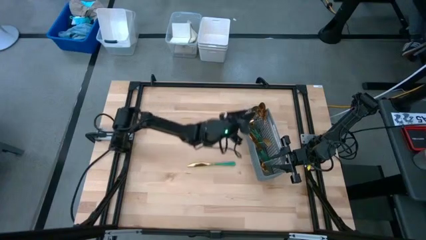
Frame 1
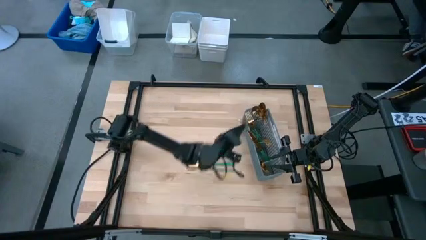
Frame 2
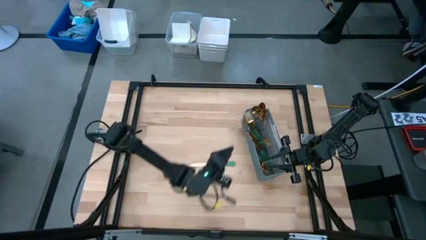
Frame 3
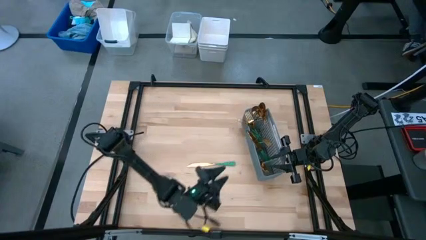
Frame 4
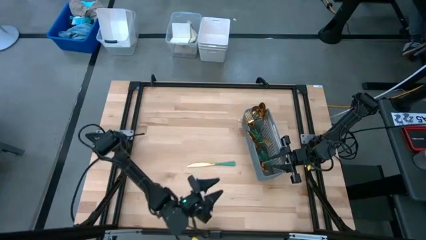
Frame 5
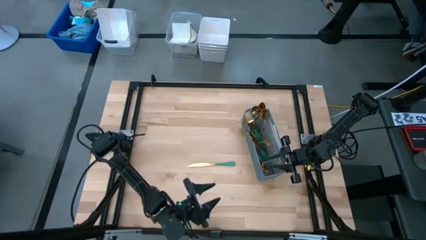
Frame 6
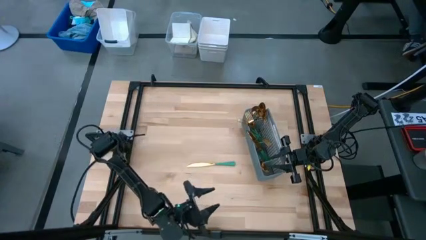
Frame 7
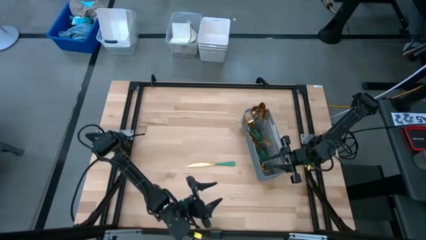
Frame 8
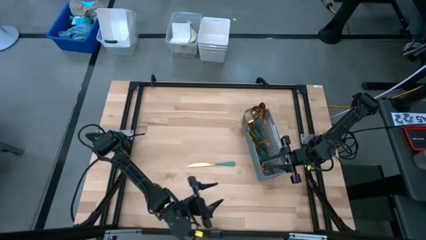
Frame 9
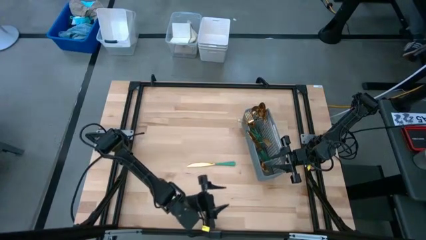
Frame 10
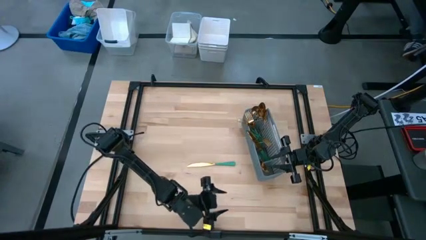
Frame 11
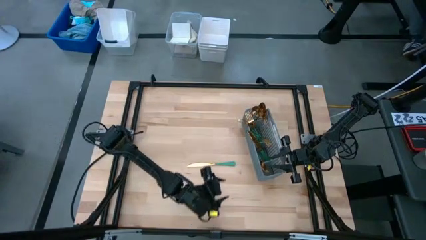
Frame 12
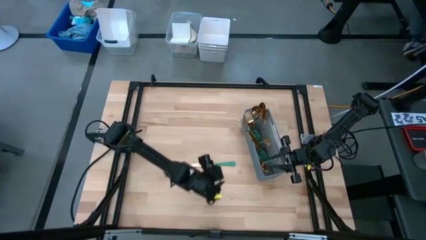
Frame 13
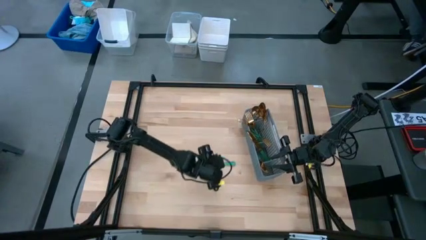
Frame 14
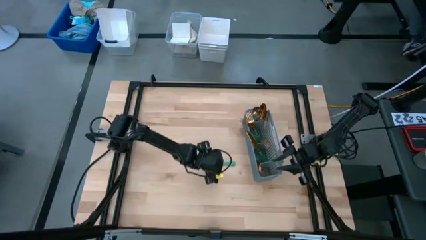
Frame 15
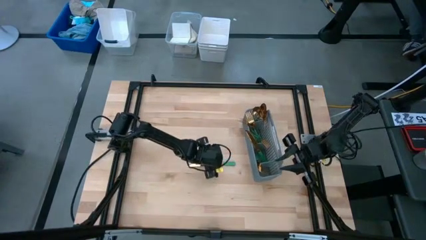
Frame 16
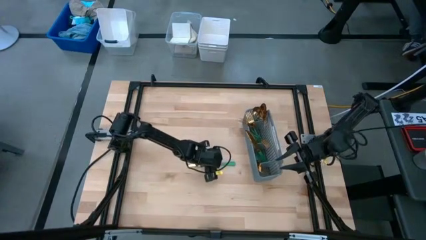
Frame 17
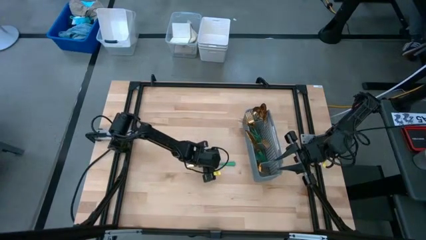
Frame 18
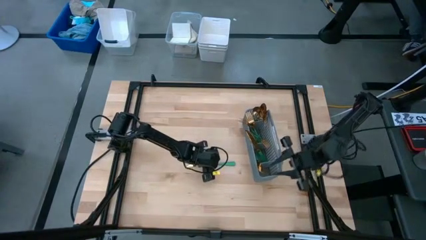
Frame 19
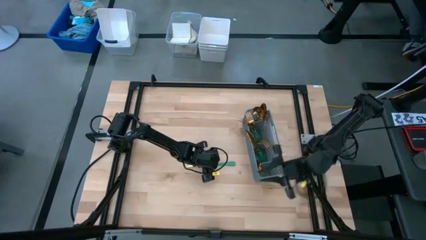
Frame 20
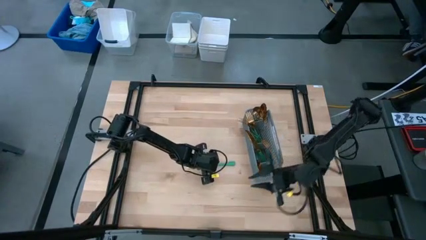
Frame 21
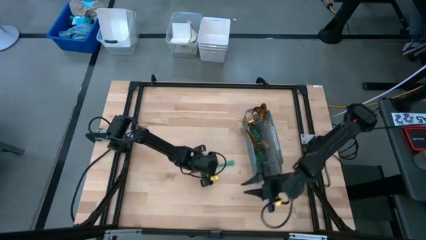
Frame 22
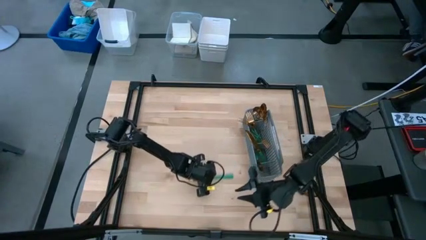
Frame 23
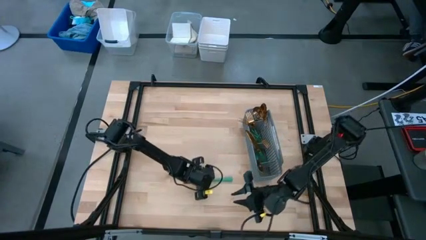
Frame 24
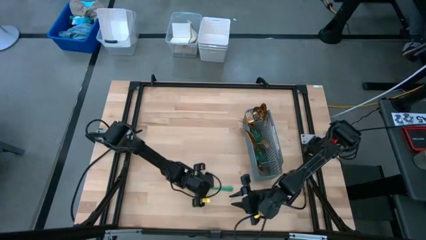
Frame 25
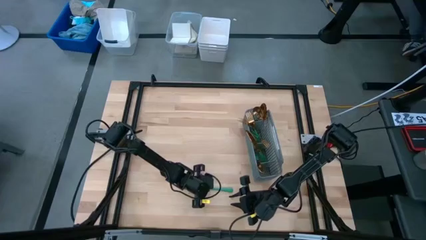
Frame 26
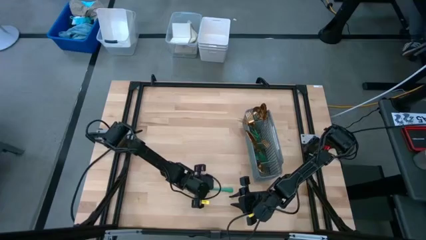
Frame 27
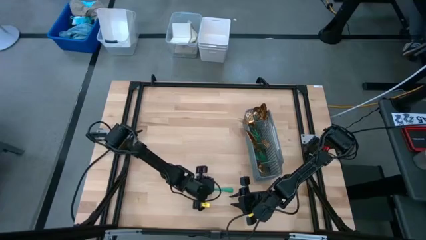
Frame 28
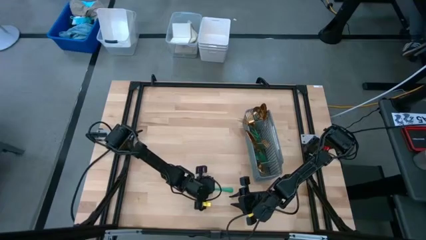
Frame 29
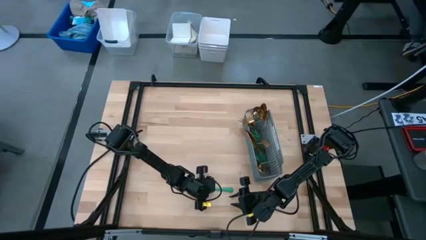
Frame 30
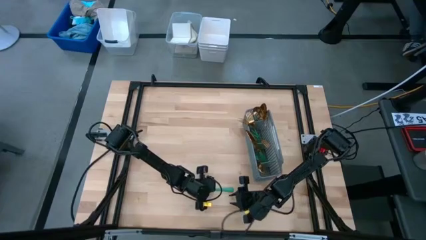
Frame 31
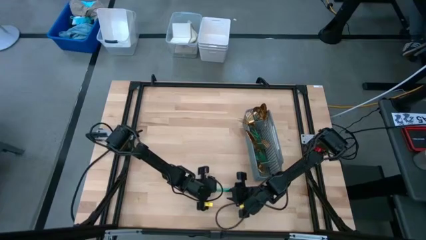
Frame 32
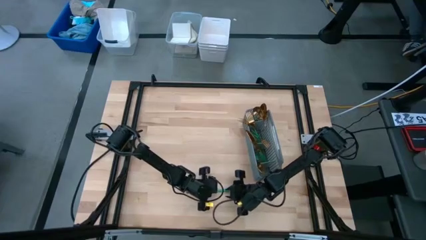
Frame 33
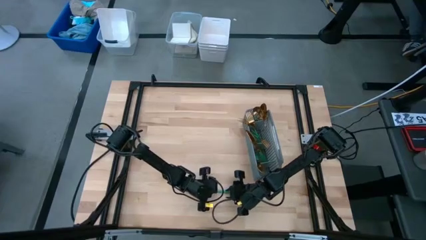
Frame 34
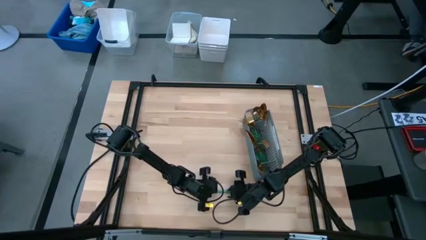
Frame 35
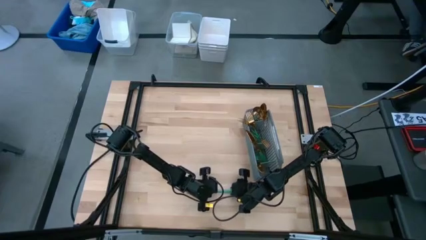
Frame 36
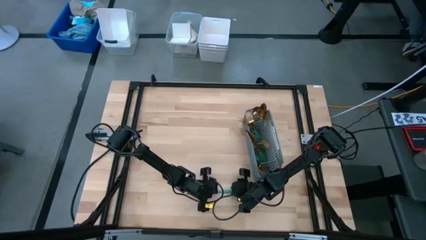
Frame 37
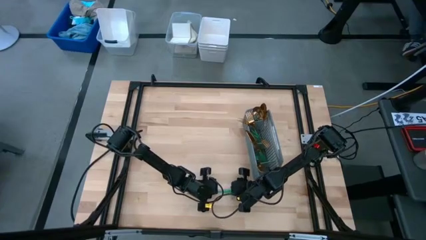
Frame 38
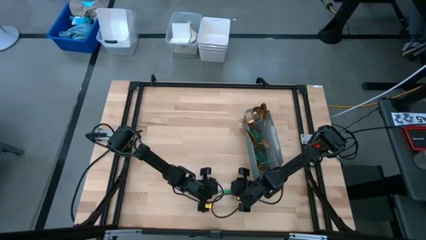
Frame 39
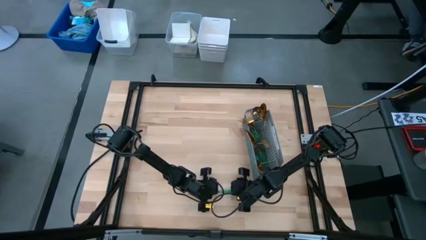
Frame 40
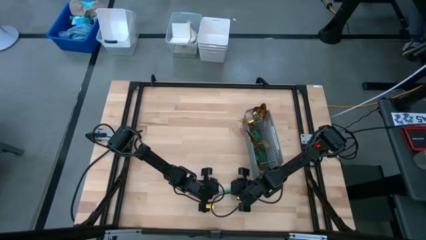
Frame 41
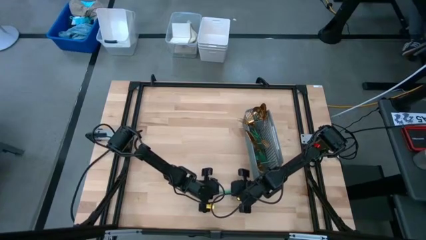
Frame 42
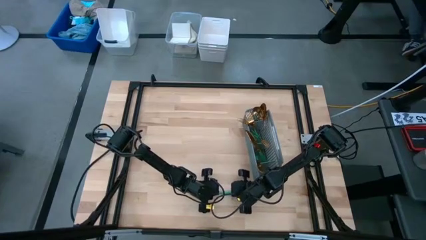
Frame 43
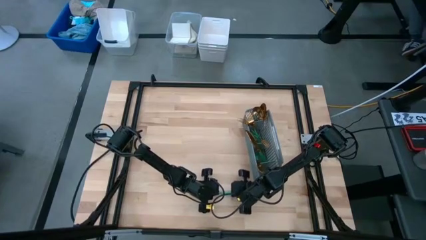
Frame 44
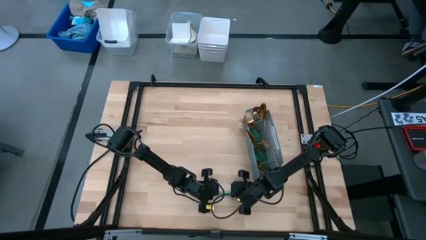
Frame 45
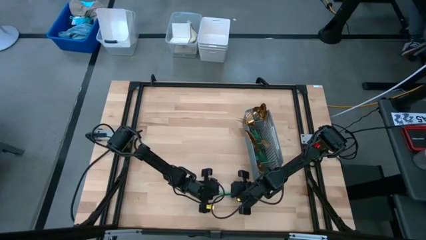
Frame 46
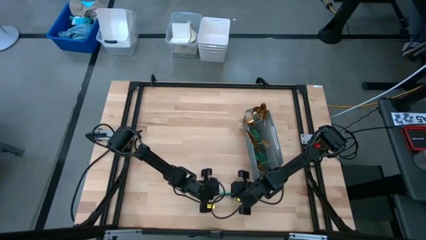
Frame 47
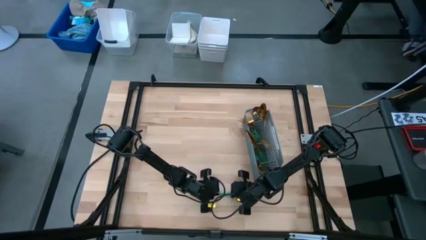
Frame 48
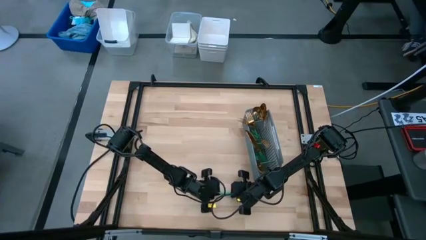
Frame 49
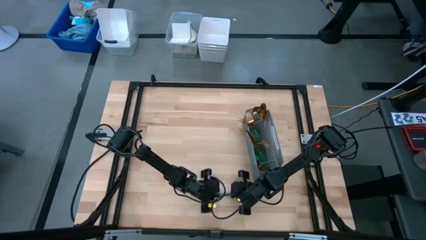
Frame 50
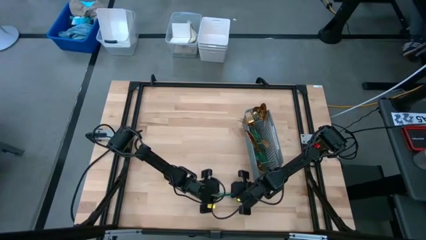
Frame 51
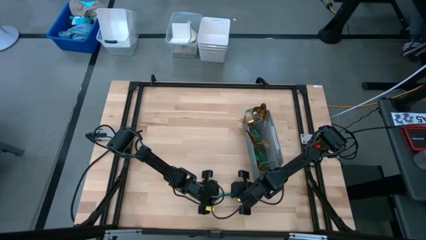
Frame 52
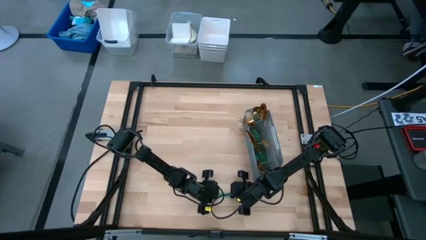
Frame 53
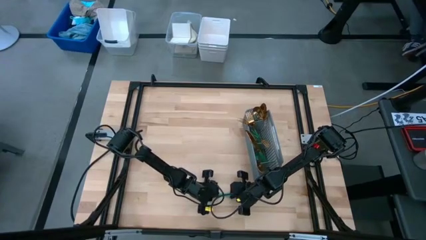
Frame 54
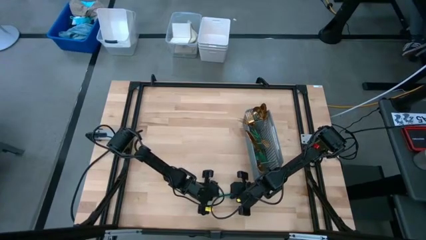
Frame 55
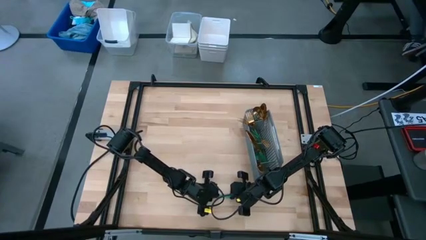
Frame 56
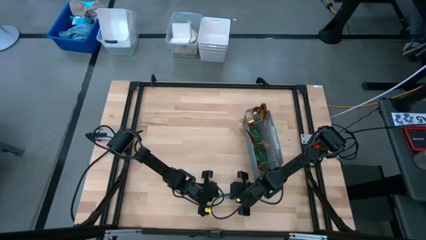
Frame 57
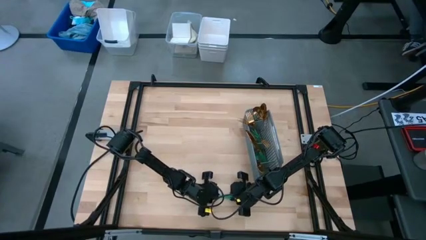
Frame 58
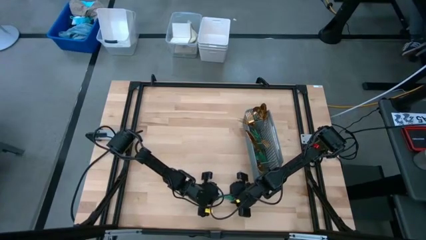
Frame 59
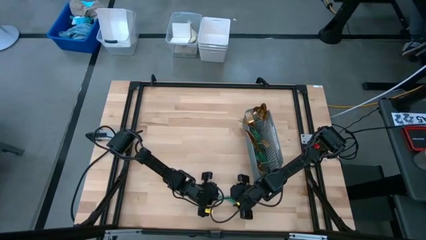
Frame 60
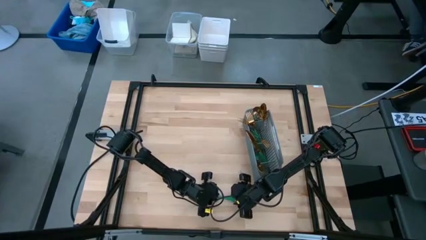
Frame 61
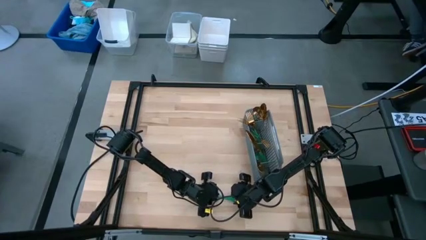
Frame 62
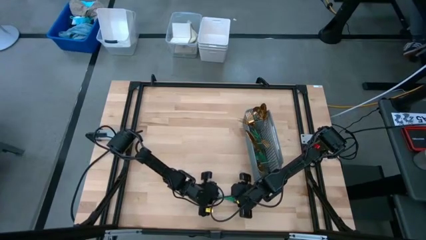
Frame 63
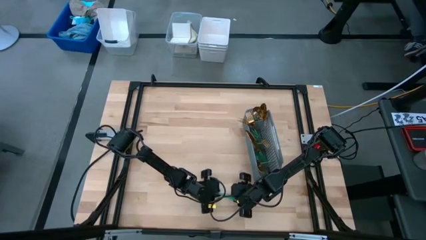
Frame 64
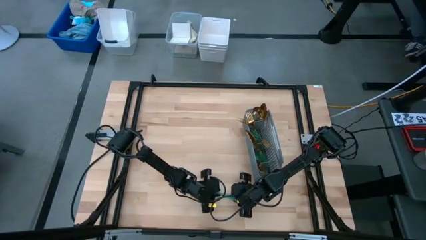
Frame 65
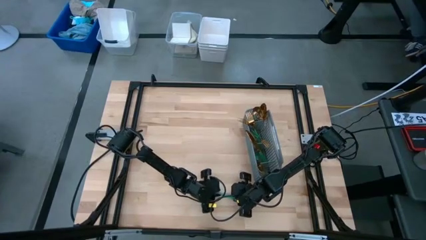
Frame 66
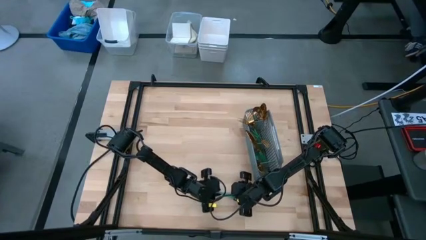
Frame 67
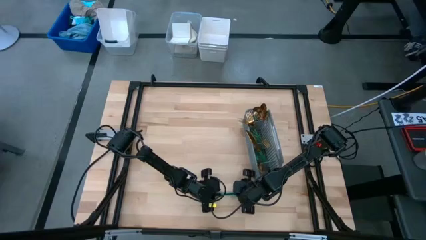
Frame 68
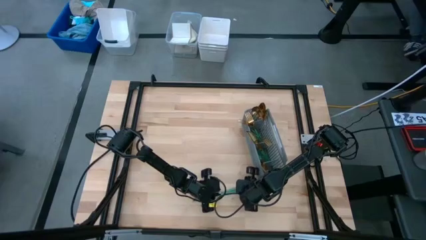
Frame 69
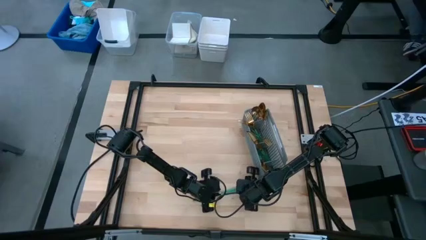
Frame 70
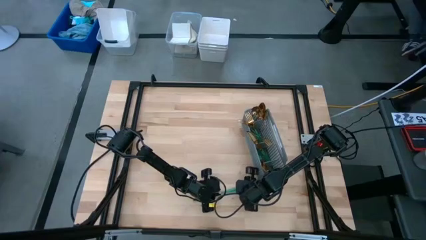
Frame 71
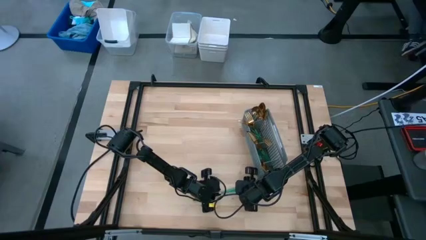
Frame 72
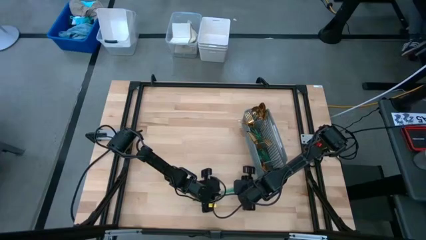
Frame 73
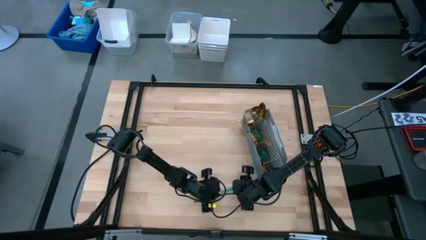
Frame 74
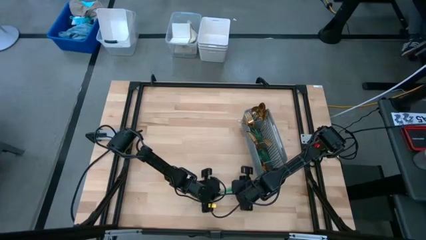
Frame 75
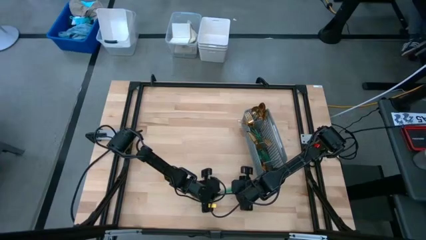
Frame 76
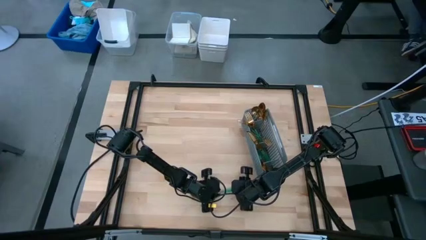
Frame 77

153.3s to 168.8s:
Task: Sort silverware
Put the knife into the bottom section of the basket
